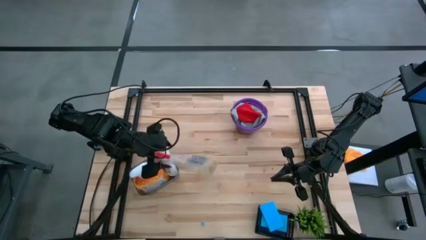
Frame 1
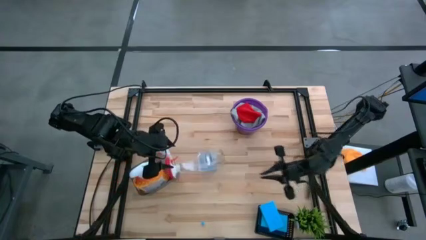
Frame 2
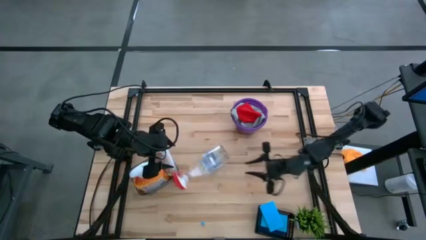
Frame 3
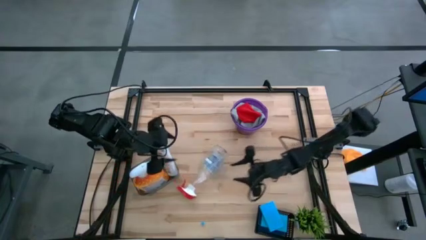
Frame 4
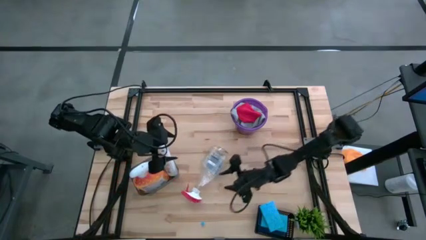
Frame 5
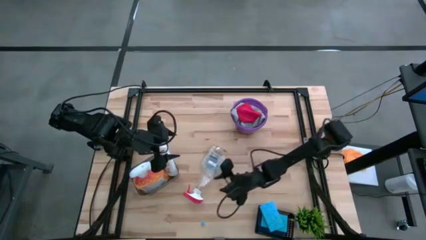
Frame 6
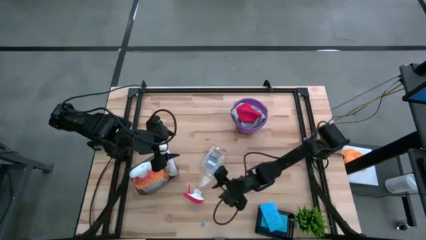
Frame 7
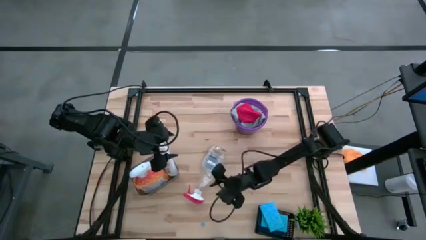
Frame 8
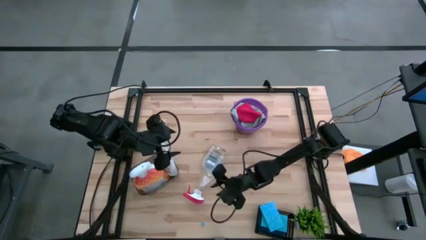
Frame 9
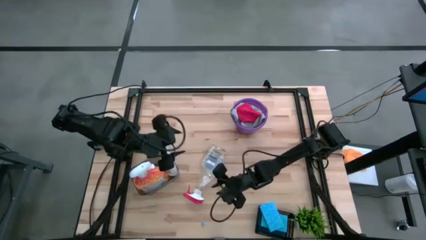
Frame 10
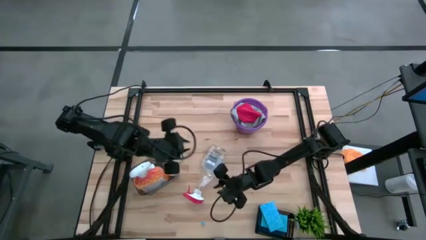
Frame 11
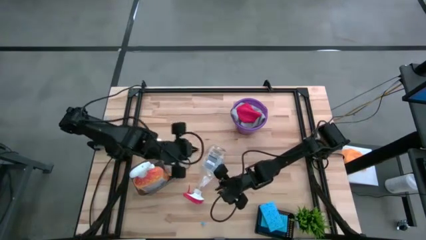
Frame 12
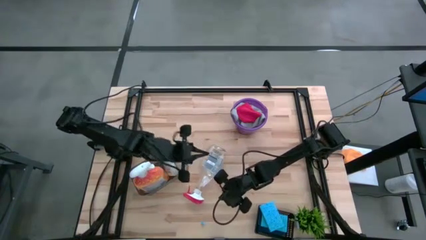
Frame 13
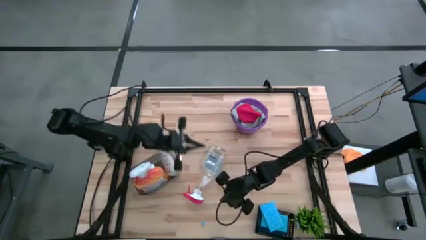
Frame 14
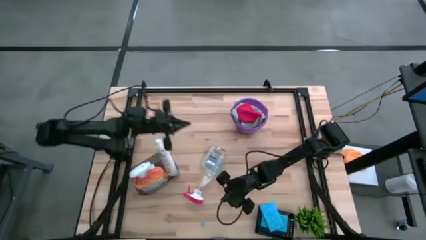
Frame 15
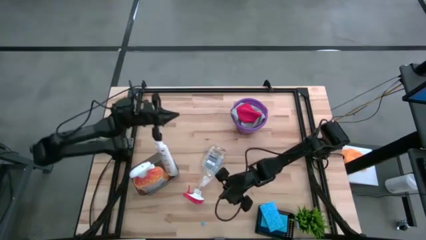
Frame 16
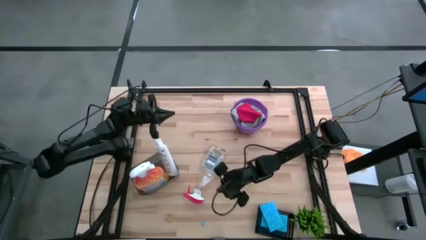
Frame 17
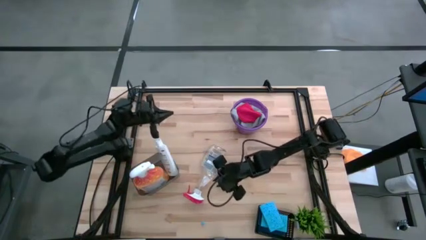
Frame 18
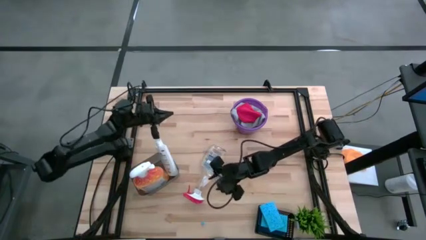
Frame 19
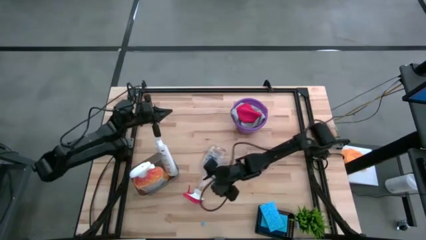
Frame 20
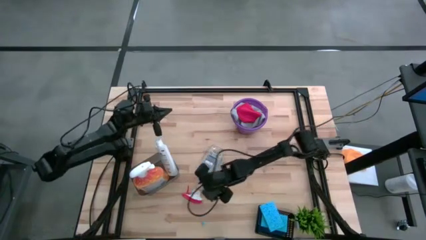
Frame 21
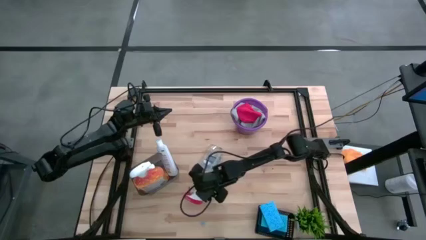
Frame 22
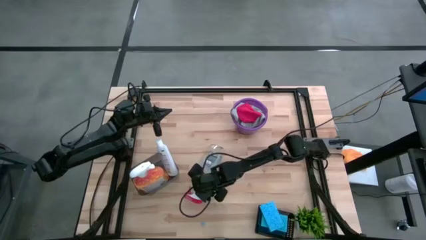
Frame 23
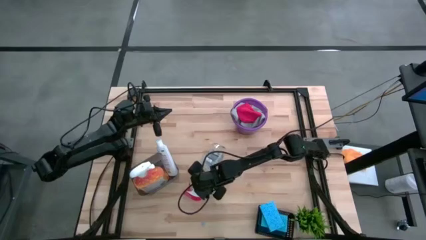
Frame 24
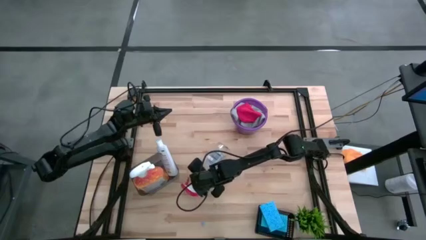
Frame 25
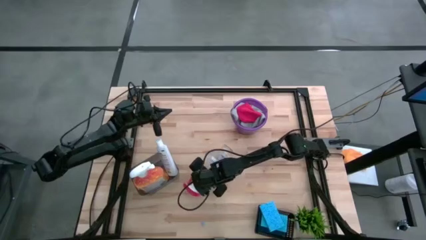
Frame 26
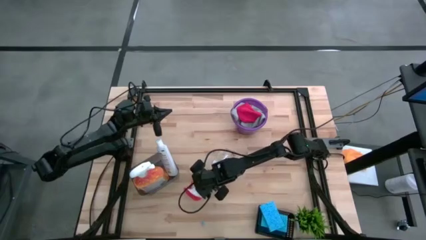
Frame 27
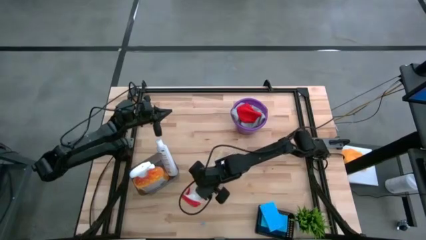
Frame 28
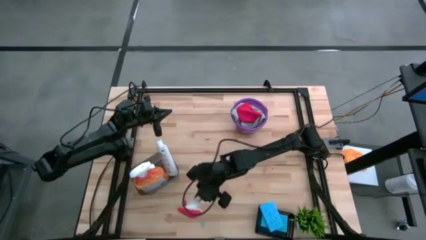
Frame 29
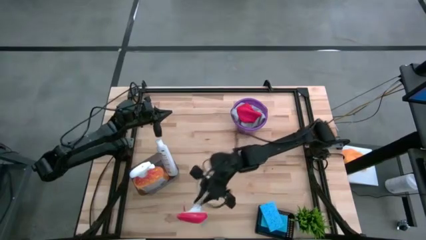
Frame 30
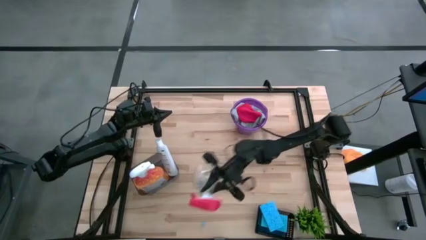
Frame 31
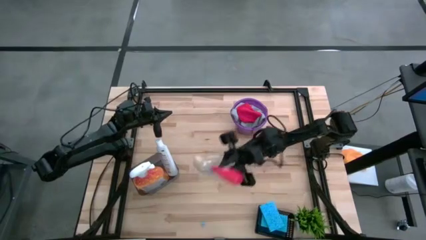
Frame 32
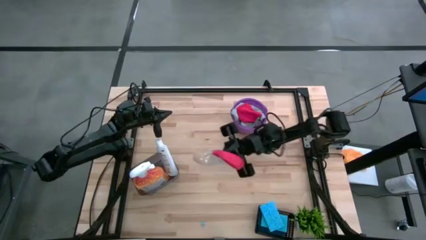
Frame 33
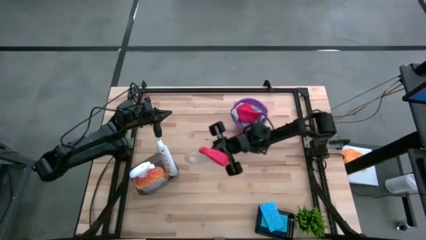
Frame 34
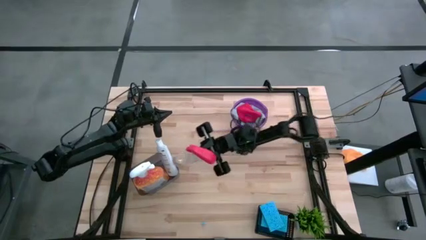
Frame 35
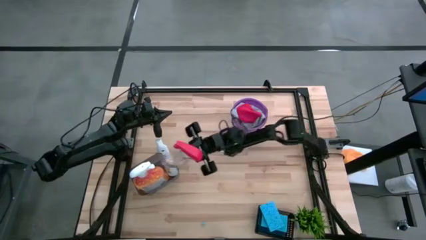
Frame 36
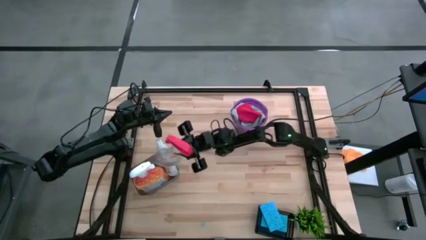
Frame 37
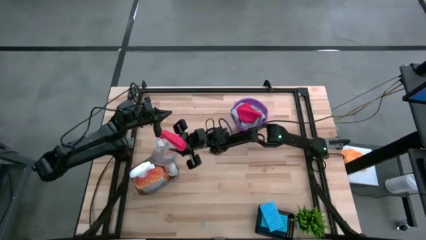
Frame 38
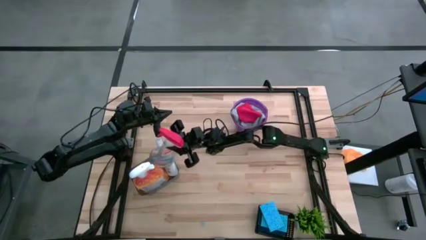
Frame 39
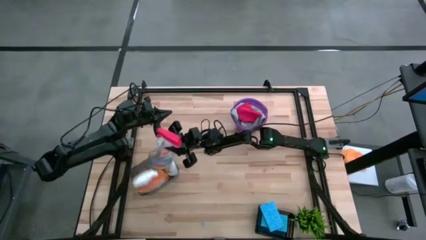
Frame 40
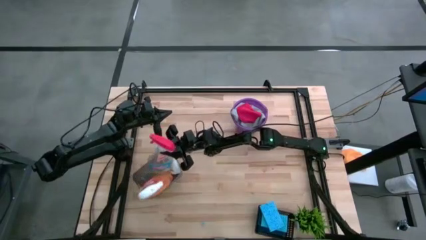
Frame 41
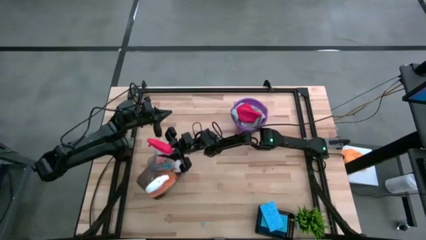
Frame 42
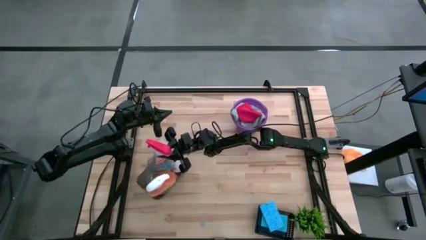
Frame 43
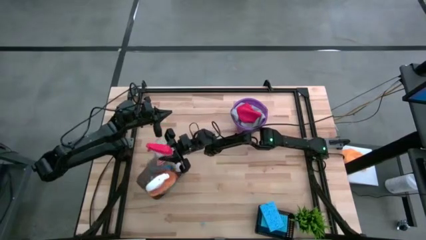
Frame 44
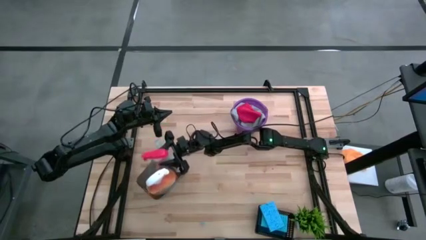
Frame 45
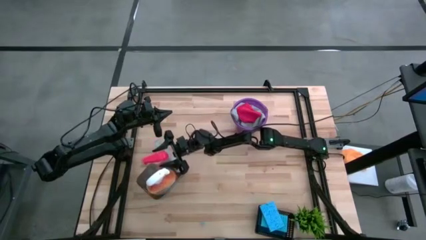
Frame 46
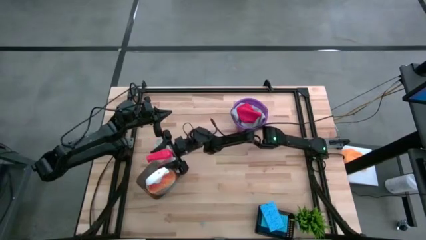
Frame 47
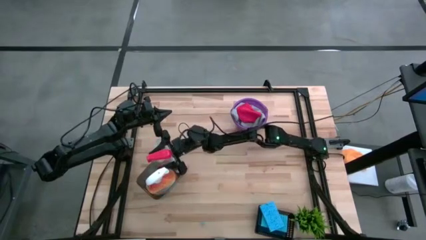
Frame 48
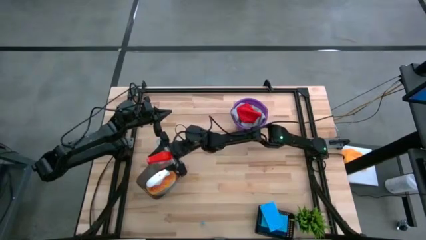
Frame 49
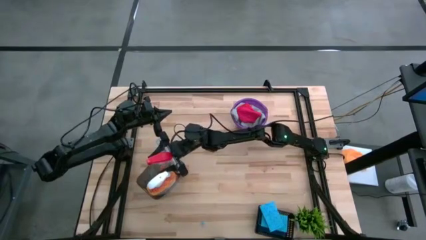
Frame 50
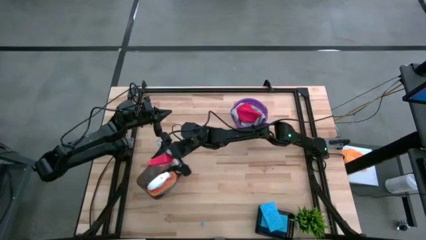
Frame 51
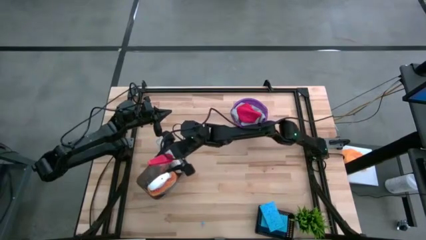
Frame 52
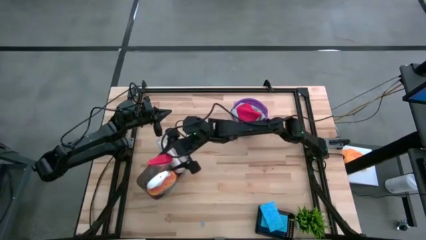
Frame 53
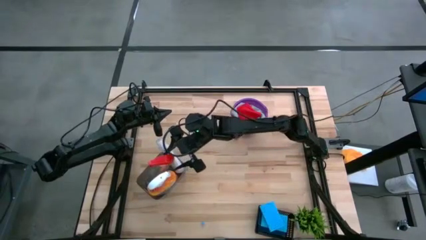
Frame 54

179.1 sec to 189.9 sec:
Task: Pick & Place Kitchen Items
Put the transparent spray bottle into the gray bin

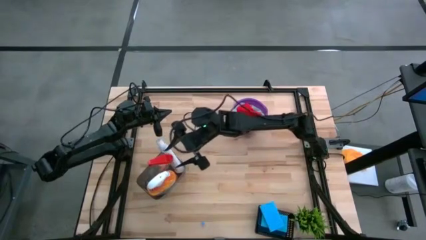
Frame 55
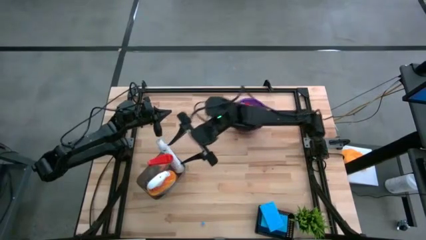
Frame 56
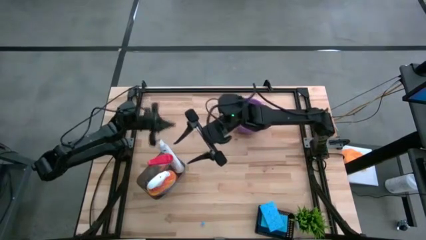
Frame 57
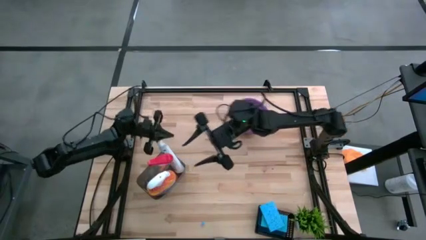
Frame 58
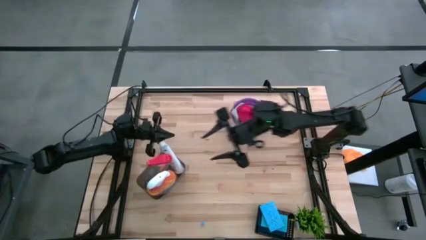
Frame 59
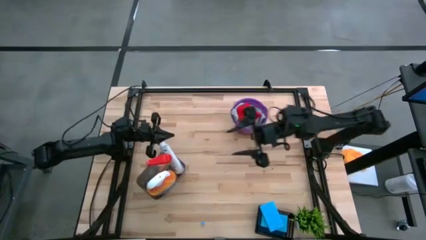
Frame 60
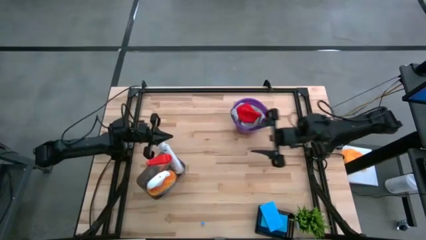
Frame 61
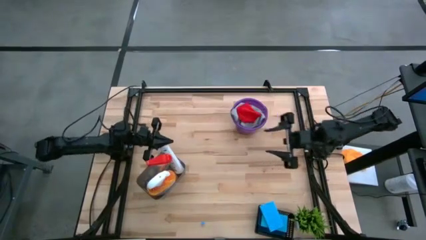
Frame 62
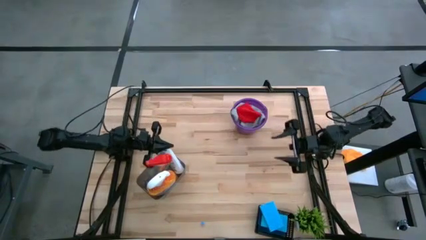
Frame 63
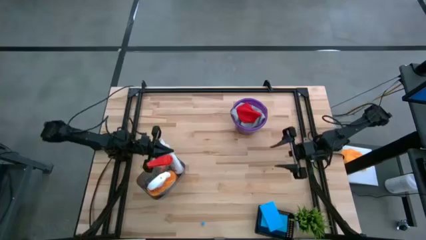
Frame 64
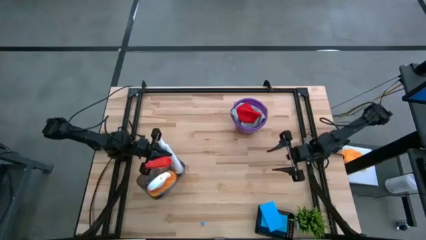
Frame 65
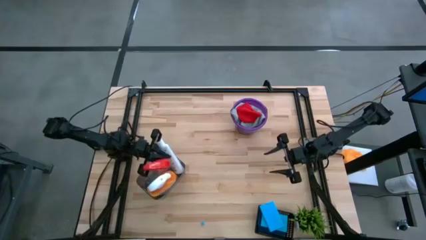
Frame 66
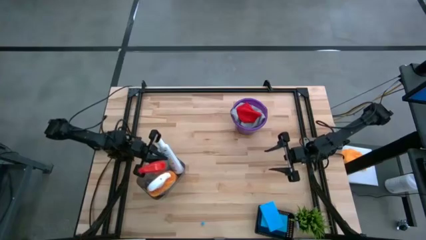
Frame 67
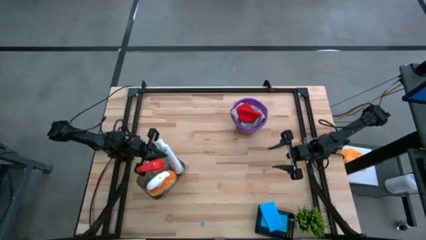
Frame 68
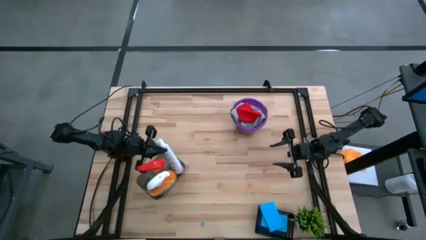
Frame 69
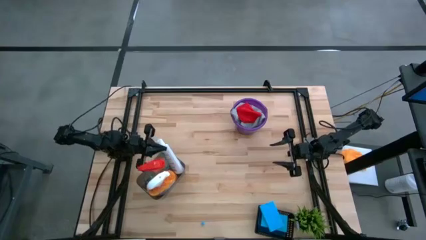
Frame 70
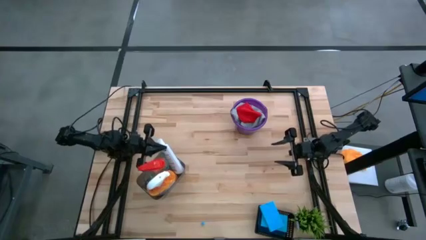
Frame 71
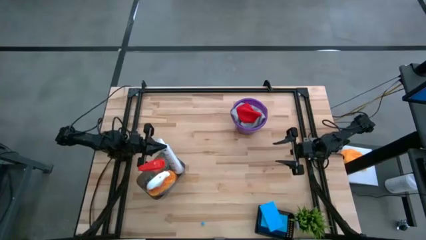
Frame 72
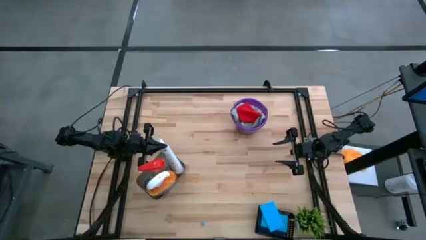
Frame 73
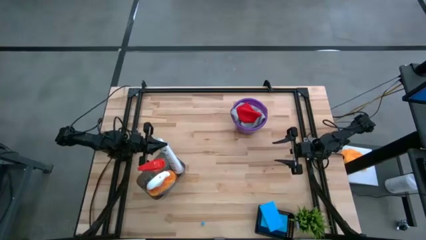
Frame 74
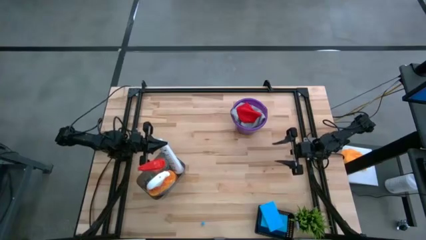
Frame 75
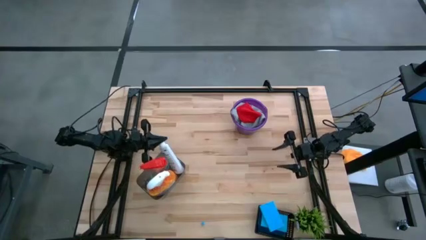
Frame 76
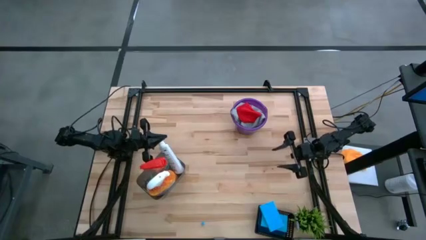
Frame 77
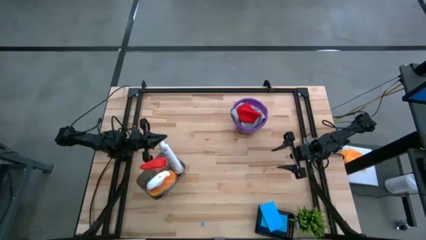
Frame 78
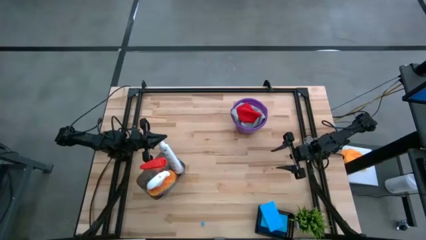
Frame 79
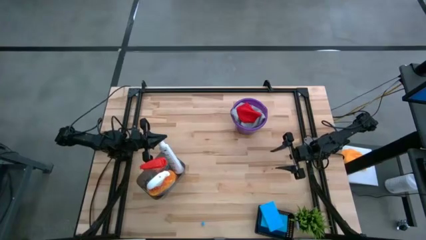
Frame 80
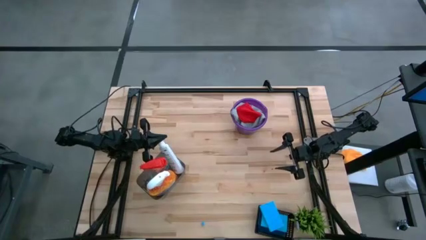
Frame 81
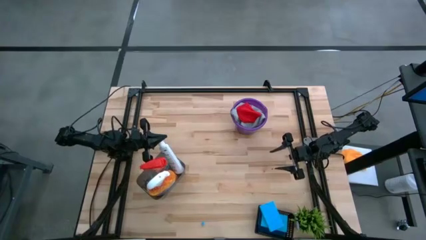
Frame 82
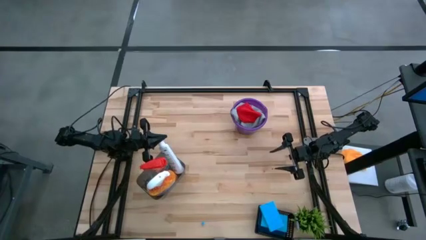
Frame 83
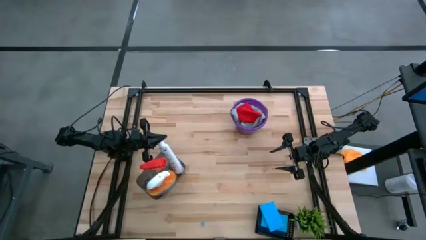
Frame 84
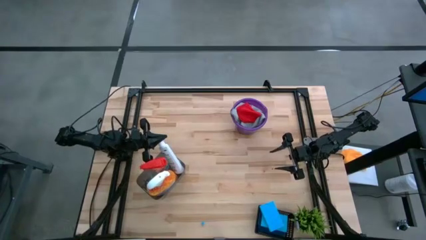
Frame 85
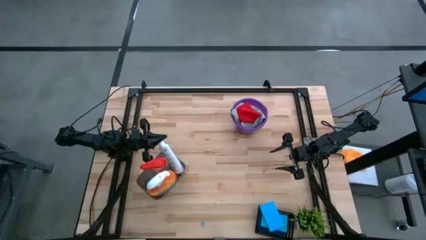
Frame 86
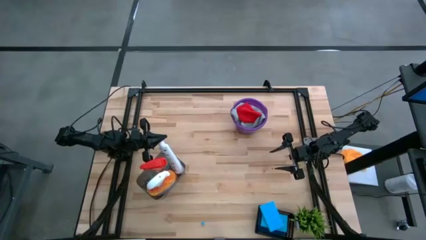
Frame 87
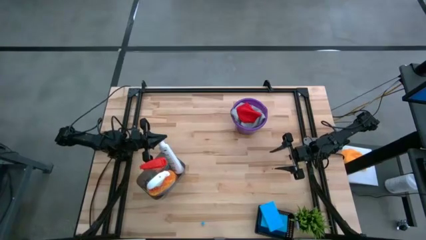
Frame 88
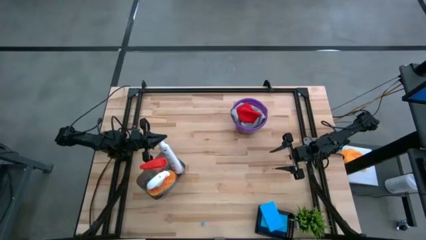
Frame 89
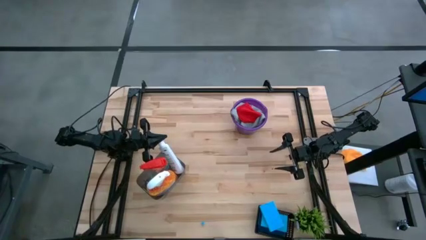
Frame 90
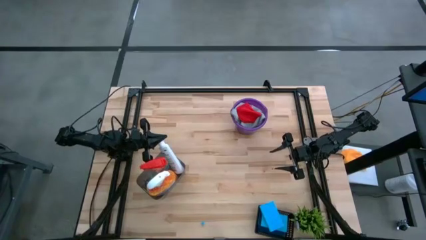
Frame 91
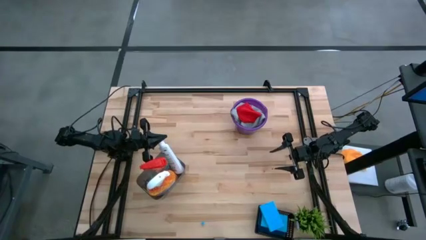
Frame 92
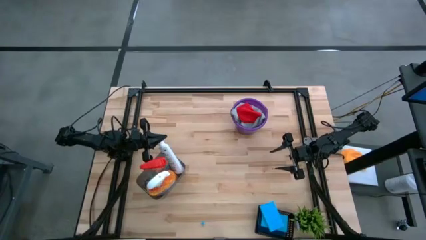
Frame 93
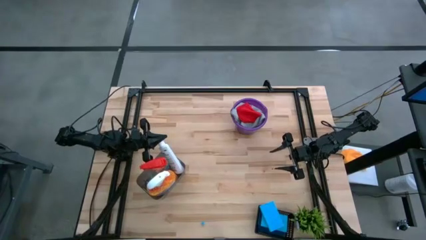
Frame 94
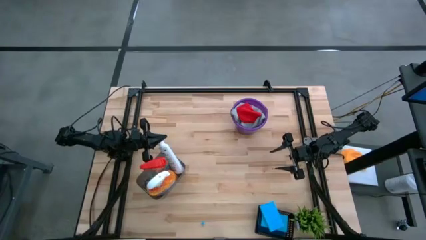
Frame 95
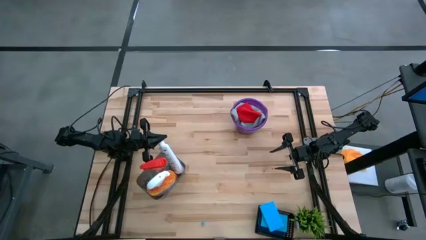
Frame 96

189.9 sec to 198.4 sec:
Return to Home Position
